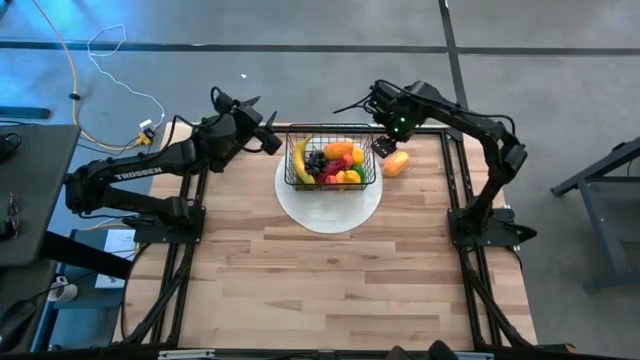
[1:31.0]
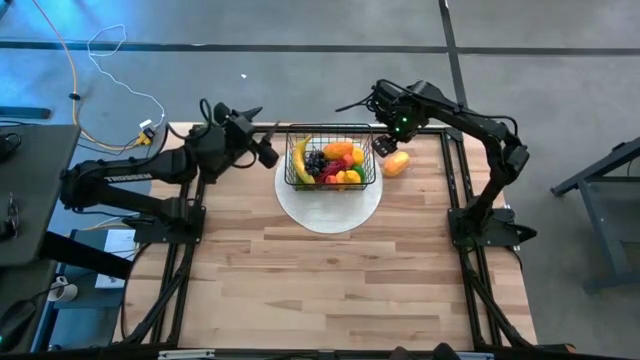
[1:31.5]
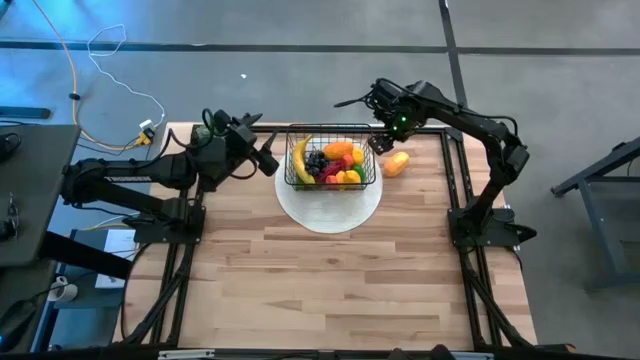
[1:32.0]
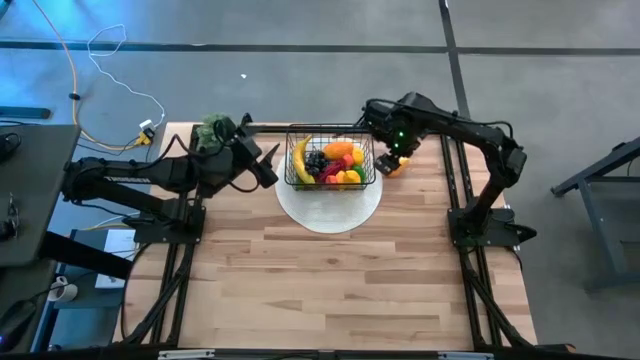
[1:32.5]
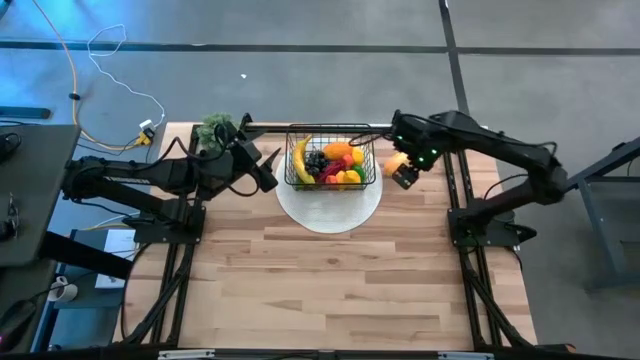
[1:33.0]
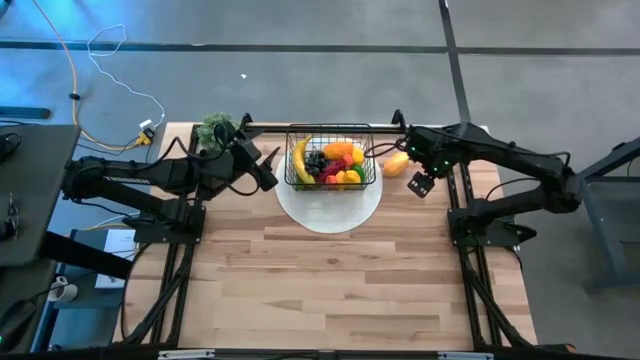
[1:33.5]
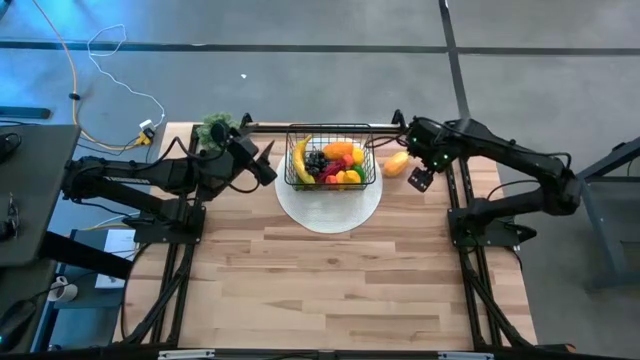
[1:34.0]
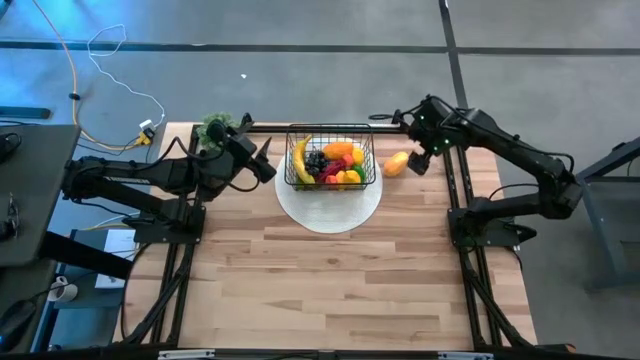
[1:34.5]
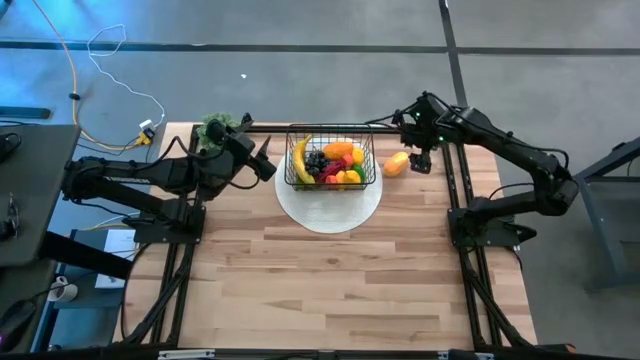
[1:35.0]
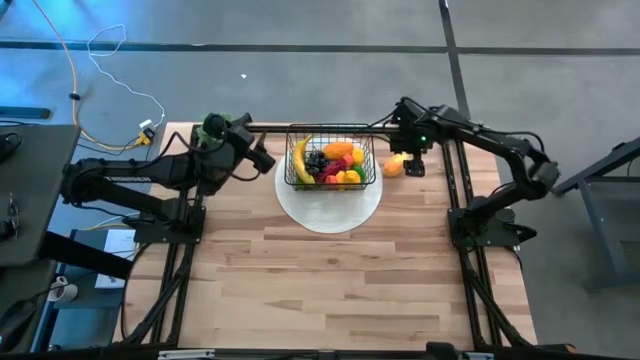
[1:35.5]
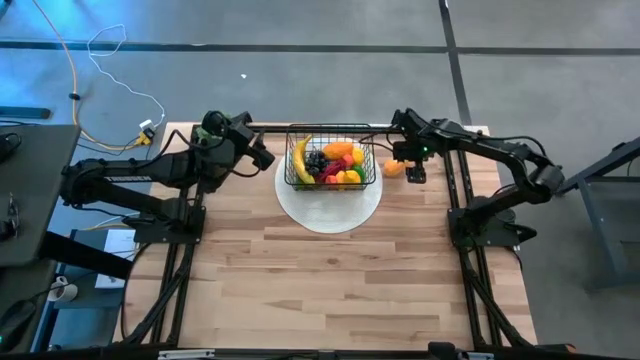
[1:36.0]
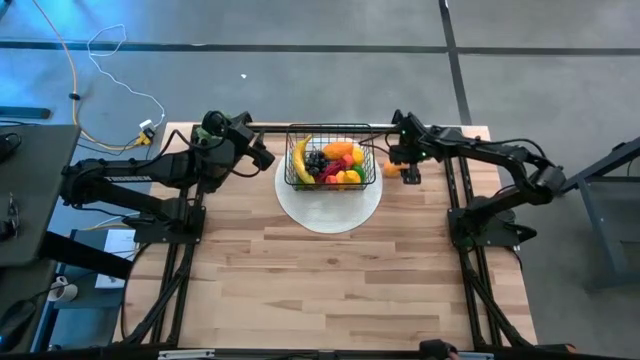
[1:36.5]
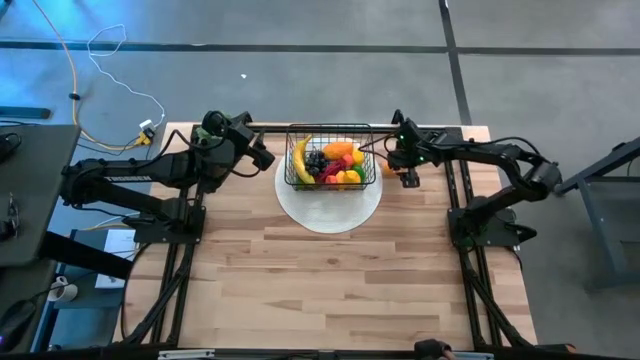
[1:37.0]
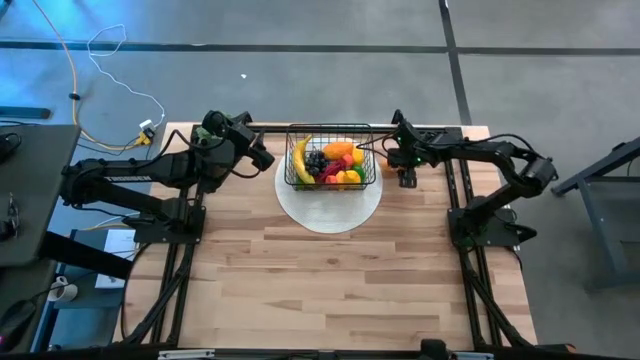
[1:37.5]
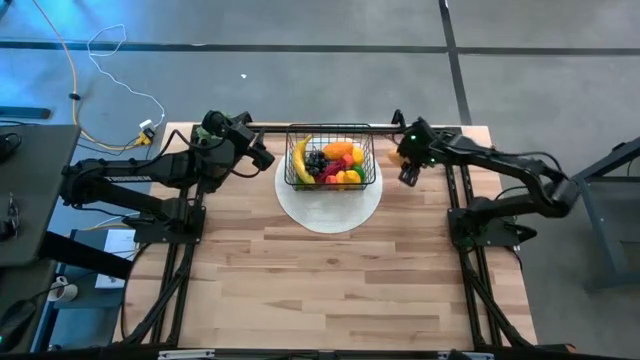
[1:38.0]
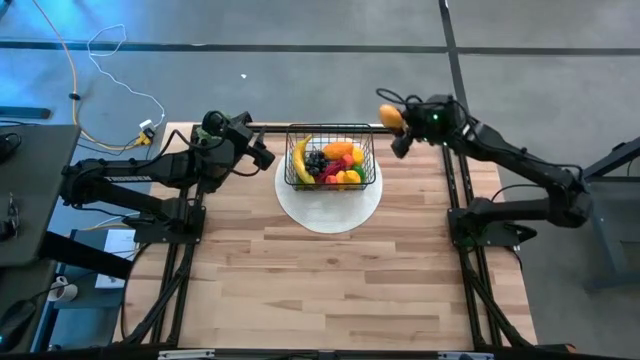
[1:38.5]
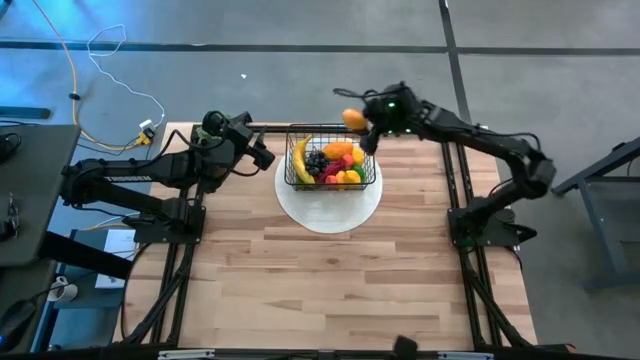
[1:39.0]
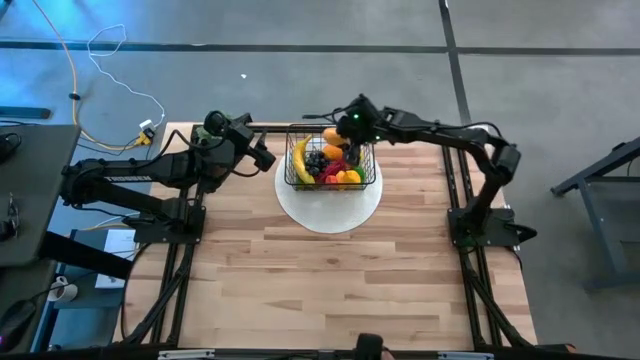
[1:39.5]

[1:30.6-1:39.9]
Task: Build produce basket
Put the yellow mango into the black wire basket

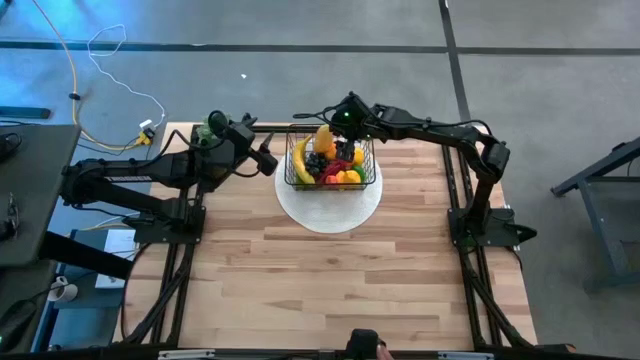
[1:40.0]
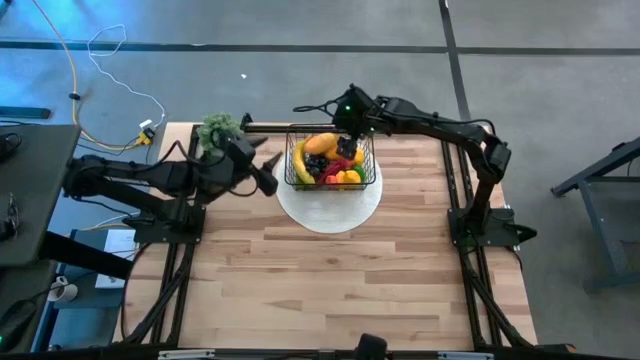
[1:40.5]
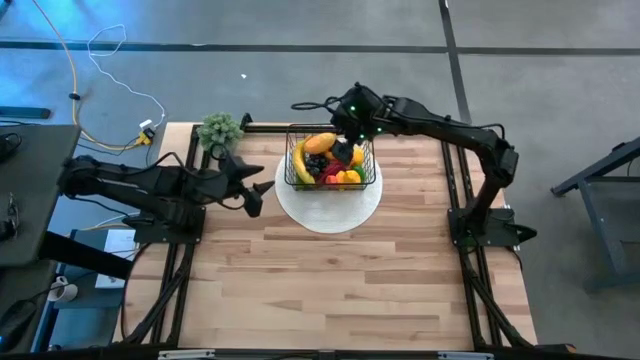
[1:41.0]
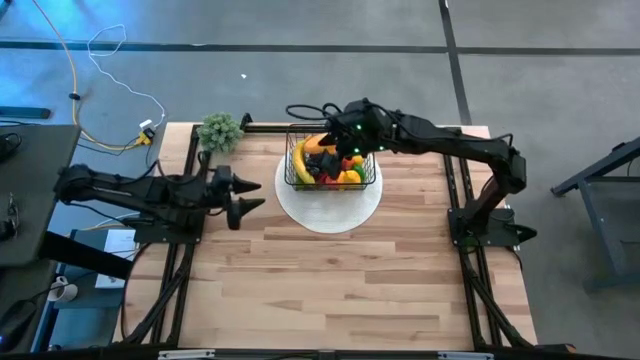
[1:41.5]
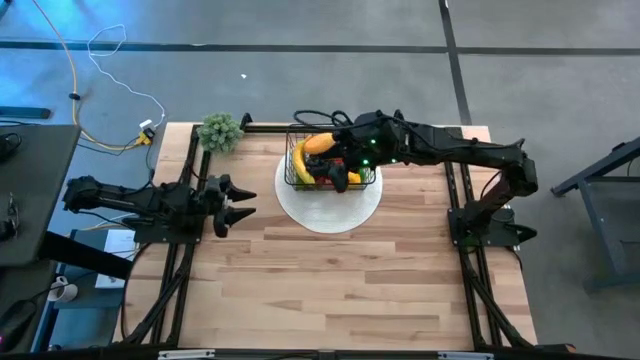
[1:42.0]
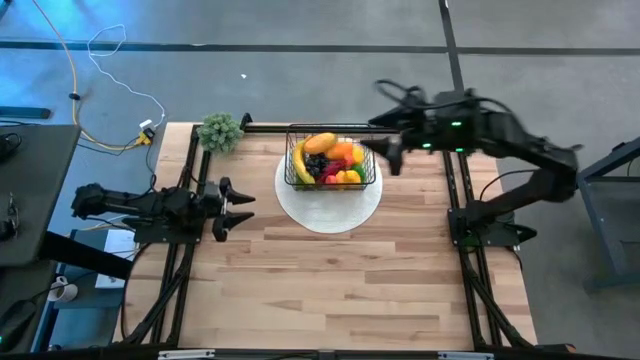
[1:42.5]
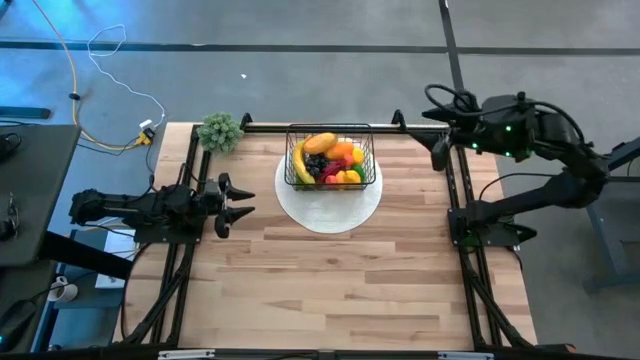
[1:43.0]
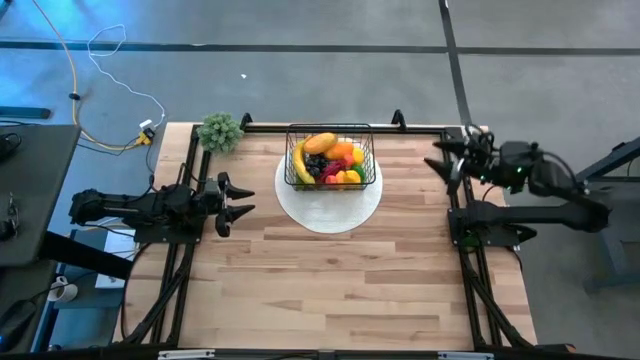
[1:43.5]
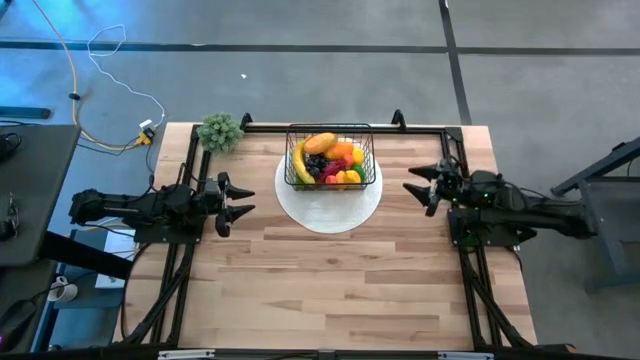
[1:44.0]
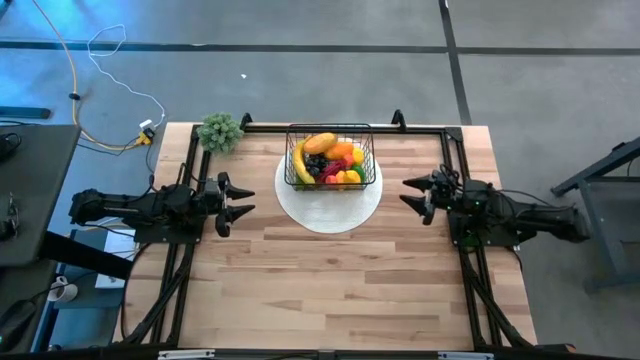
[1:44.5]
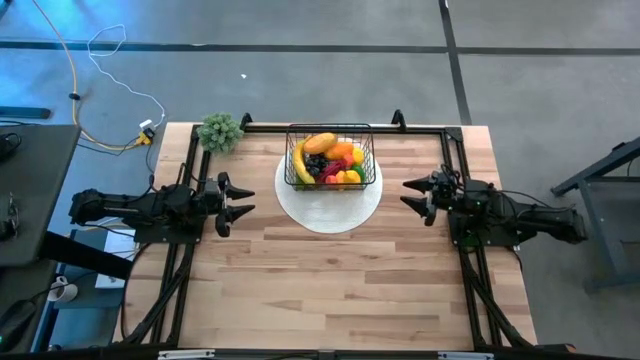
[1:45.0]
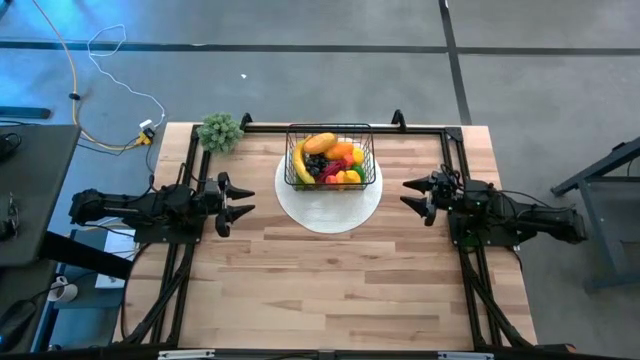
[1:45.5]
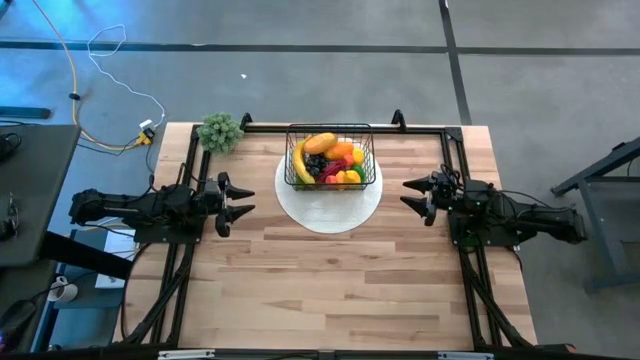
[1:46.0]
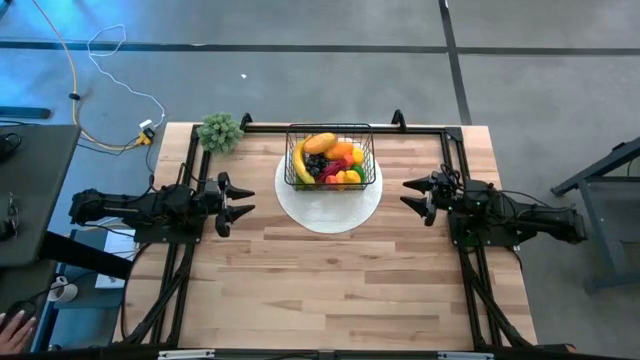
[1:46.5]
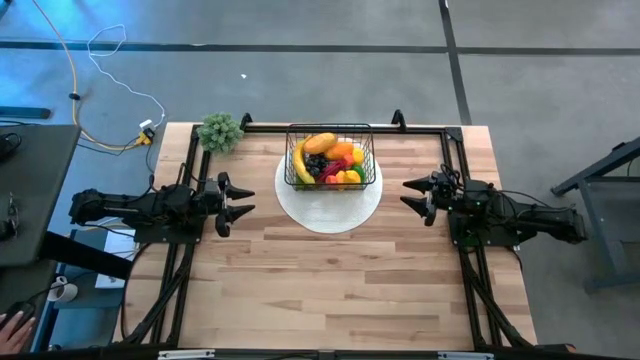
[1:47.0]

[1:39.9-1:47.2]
Return to Home Position

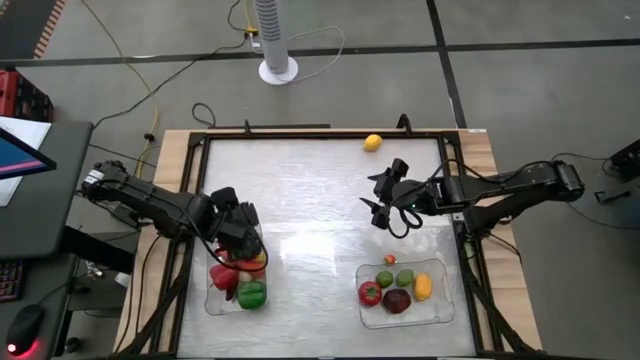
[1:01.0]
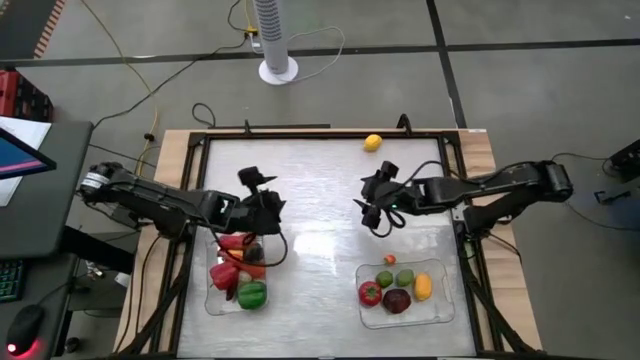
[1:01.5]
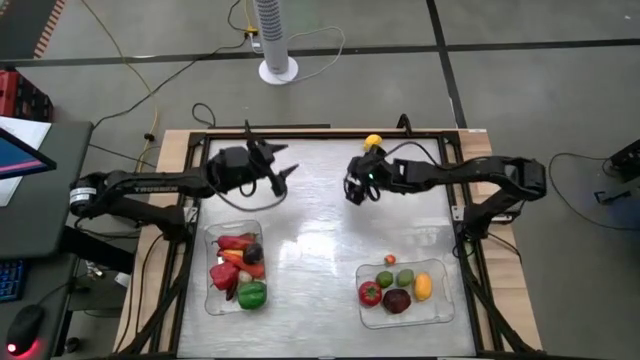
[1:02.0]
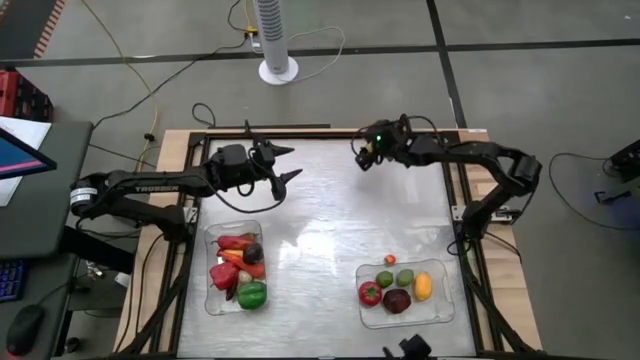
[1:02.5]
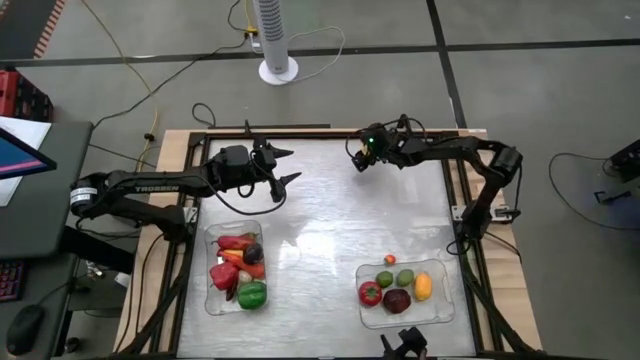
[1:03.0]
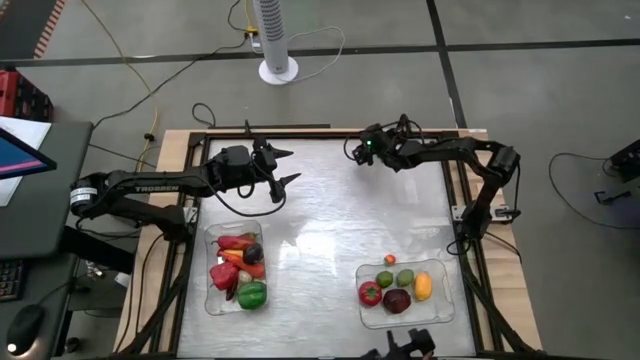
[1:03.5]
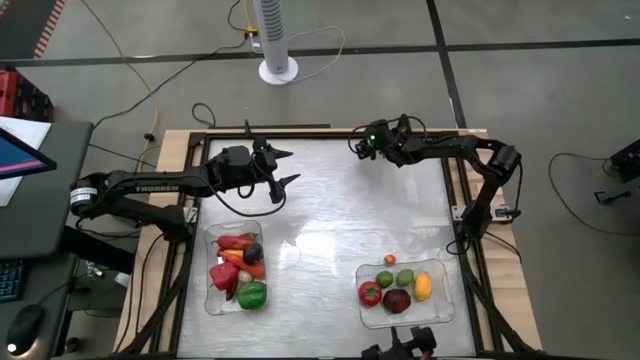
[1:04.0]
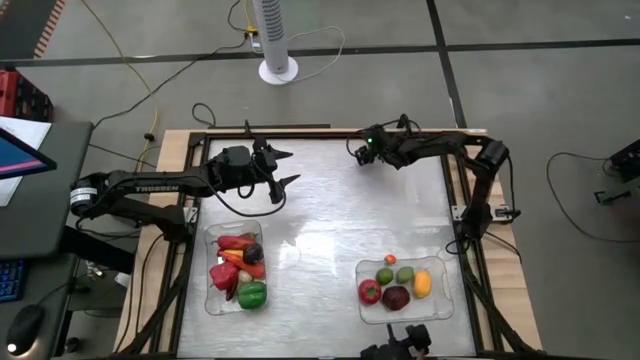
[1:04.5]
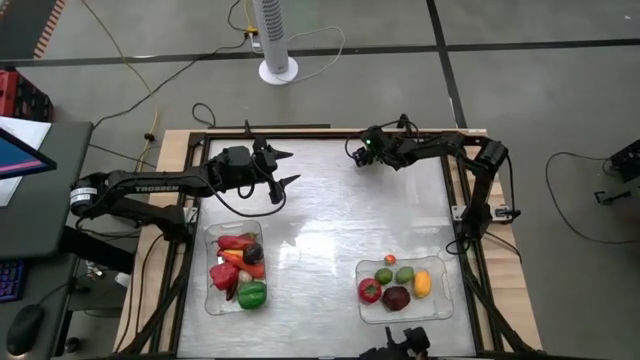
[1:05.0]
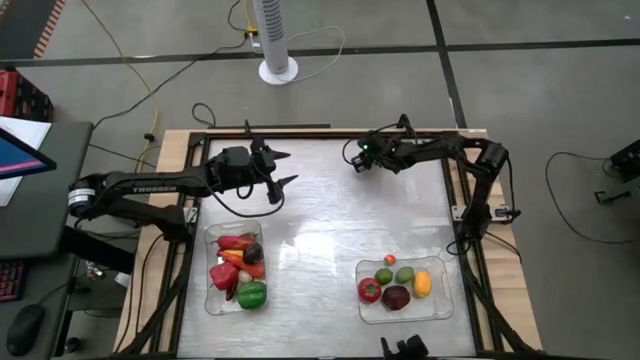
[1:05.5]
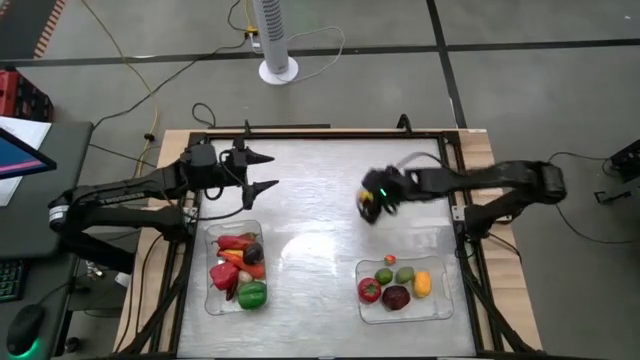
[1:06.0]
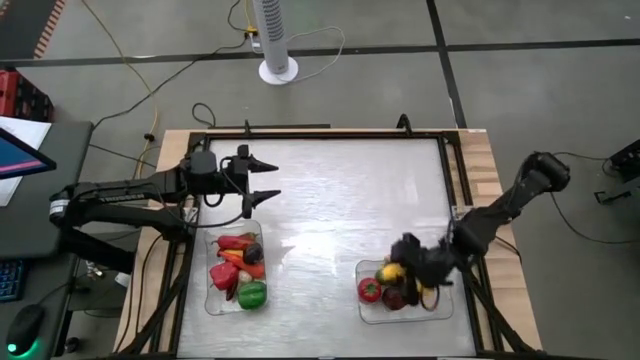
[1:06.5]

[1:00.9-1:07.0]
Task: Sort produce into baskets
Put the lemon into the right transparent bin
